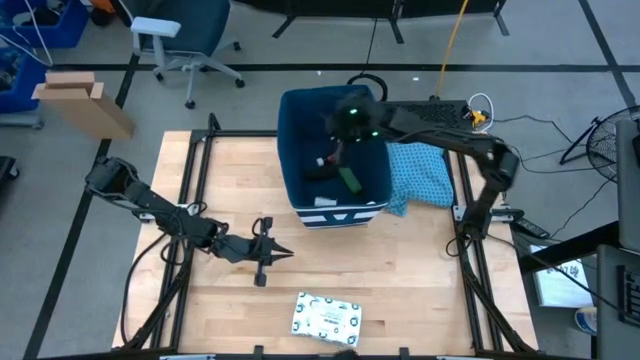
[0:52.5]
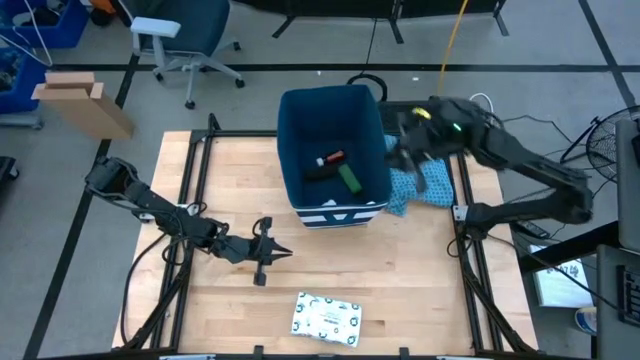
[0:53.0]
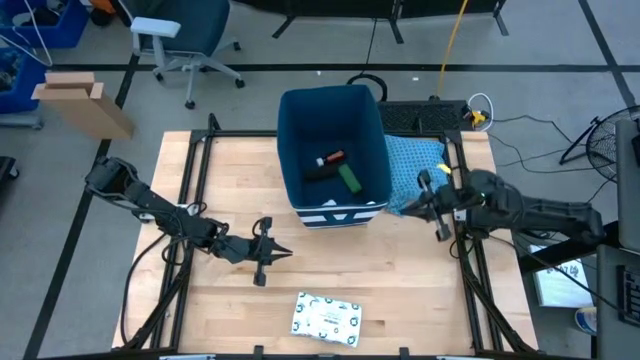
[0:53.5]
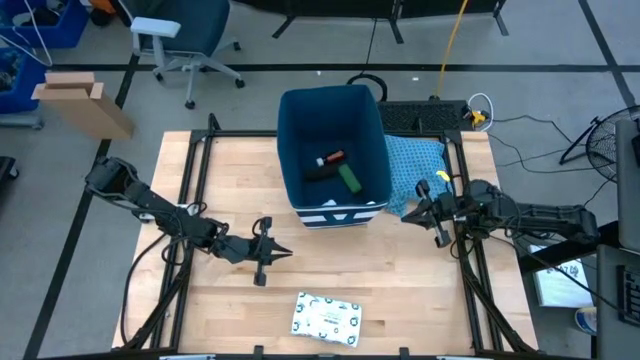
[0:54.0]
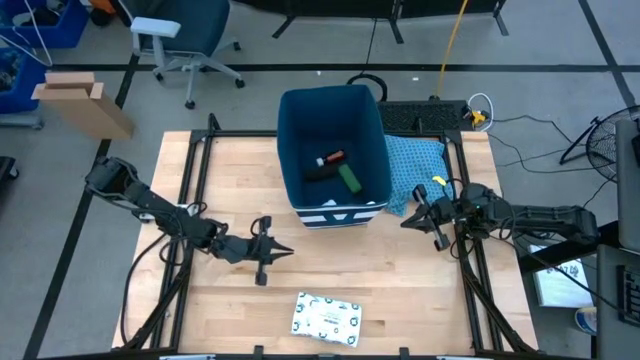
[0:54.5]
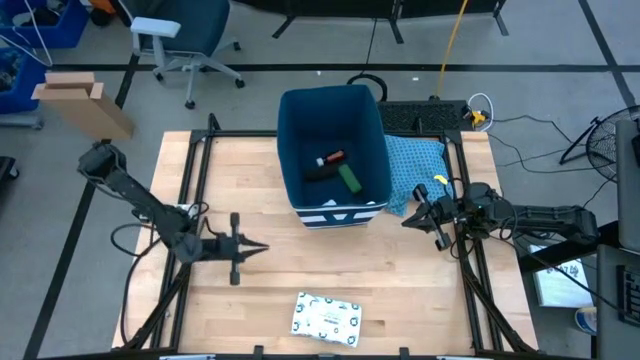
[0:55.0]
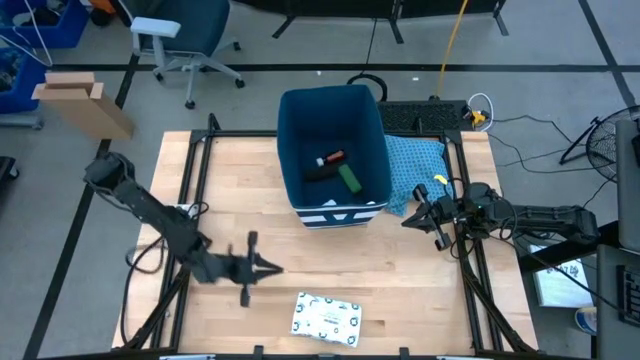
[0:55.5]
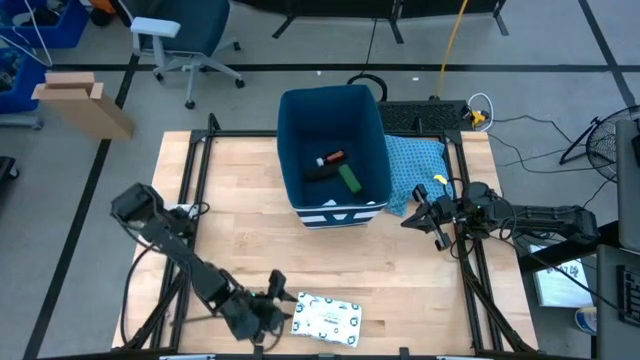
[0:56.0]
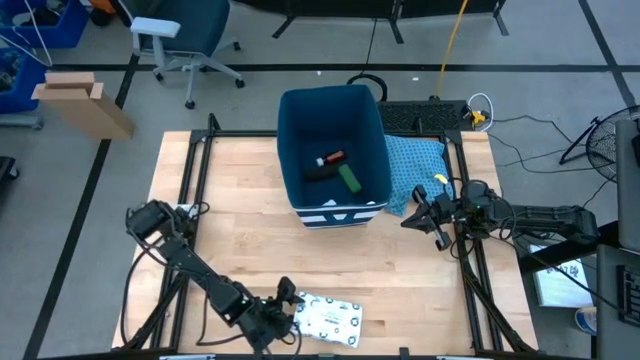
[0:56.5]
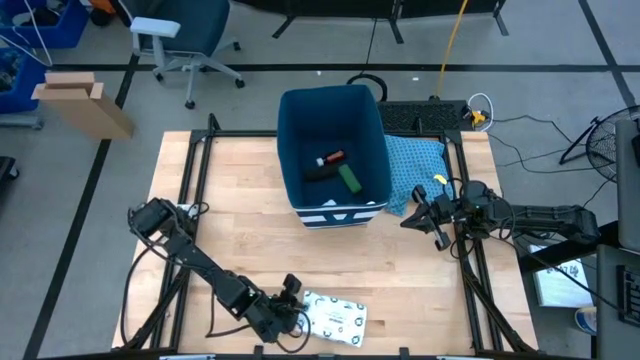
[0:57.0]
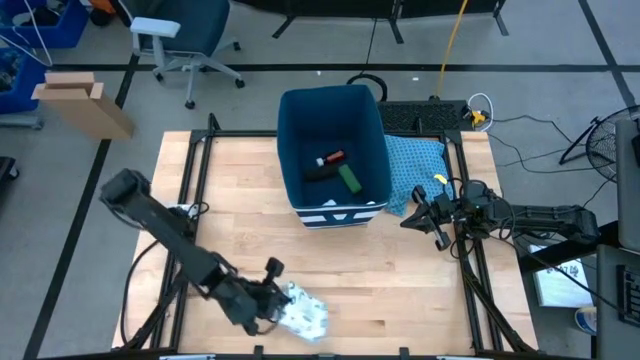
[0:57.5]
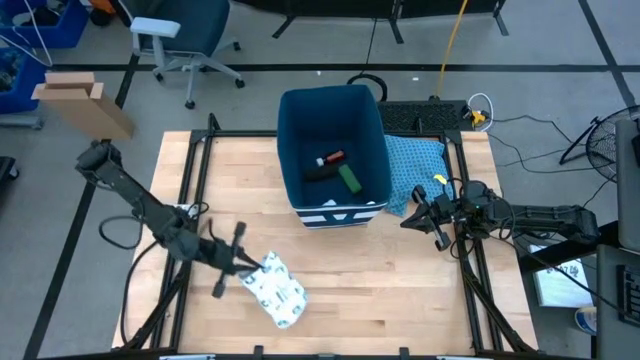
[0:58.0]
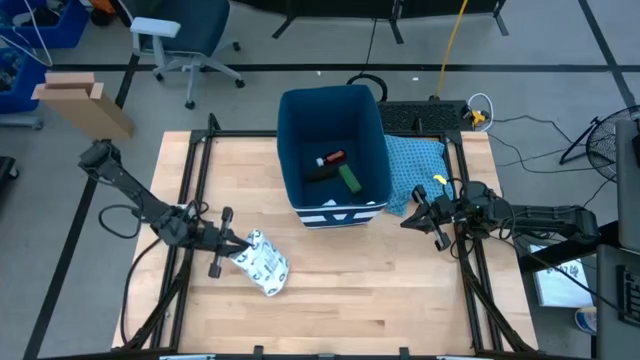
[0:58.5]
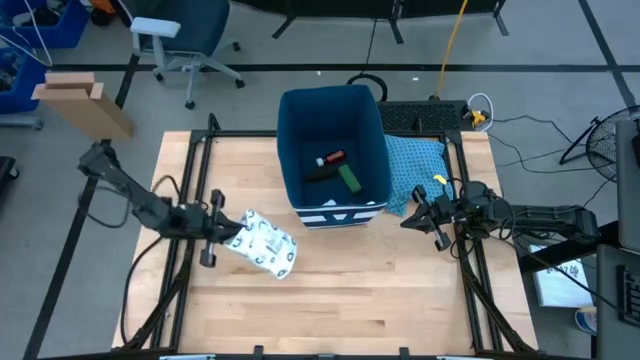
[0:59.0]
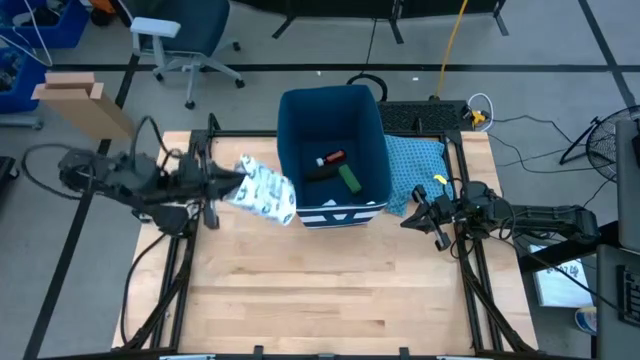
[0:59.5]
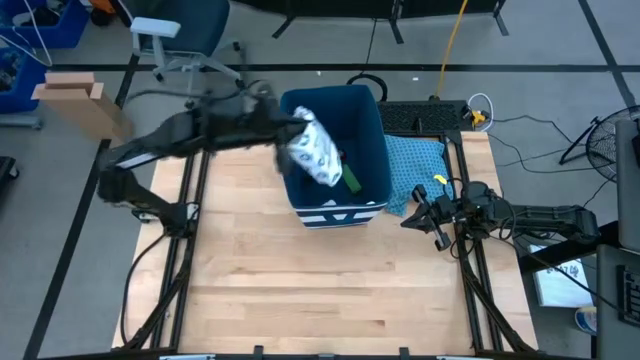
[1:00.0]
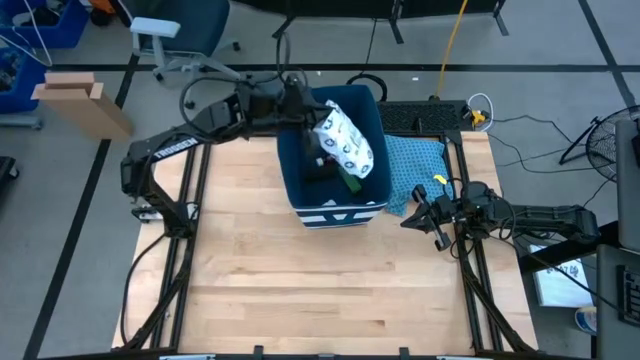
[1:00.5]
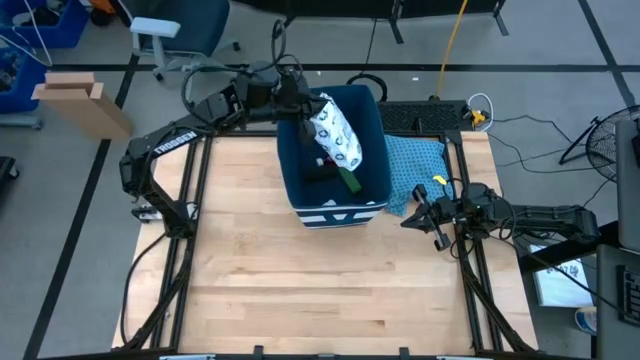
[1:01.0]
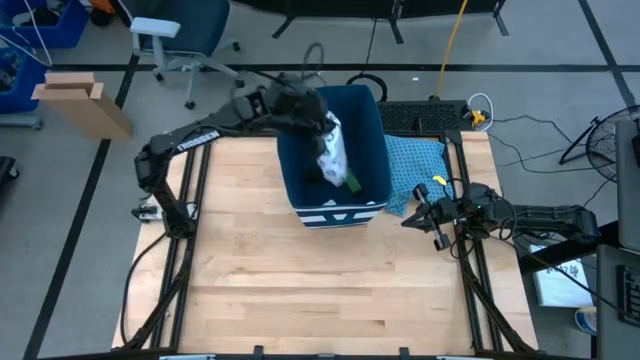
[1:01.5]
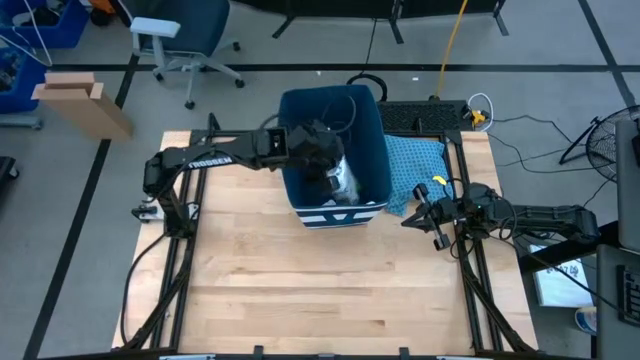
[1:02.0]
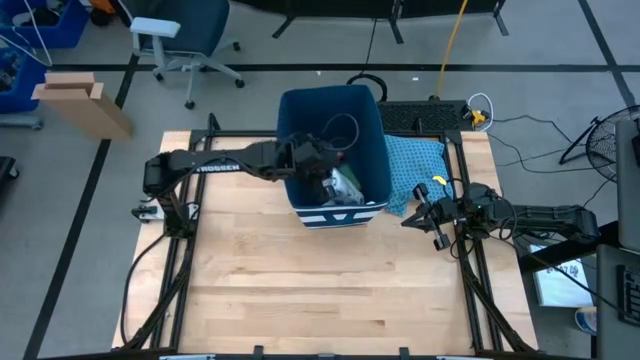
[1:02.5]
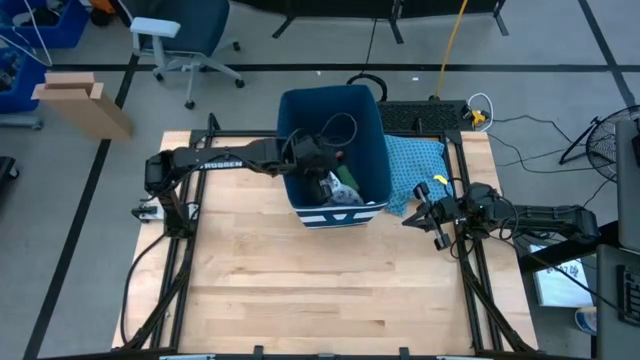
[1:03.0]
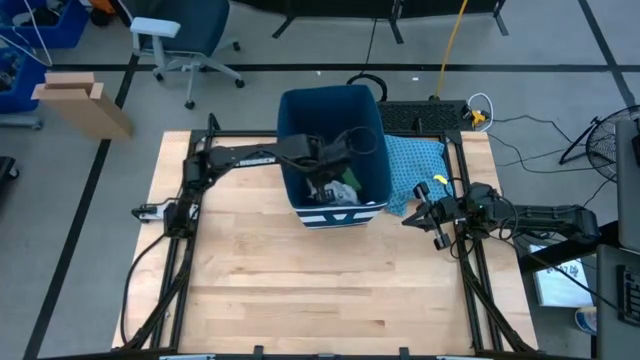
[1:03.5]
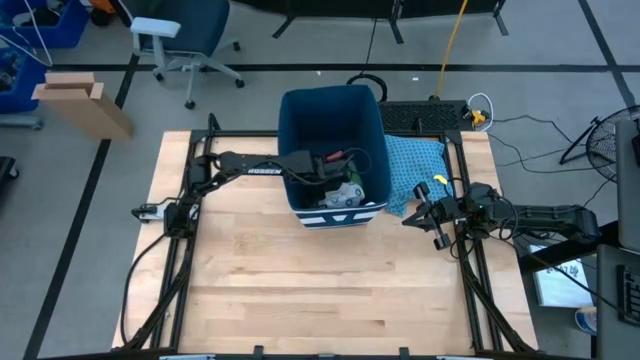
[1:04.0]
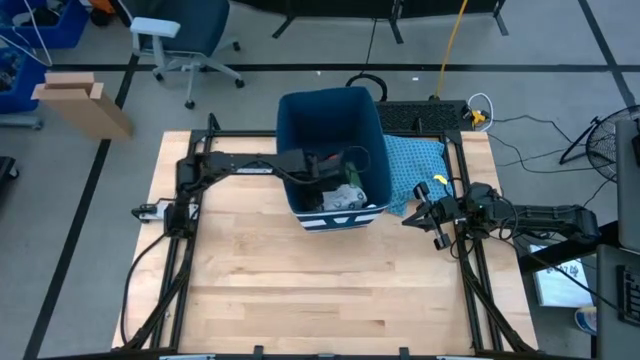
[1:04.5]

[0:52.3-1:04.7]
Task: Pick & place medical supplies in basket/bin
Put the mailer bag into the blue bin

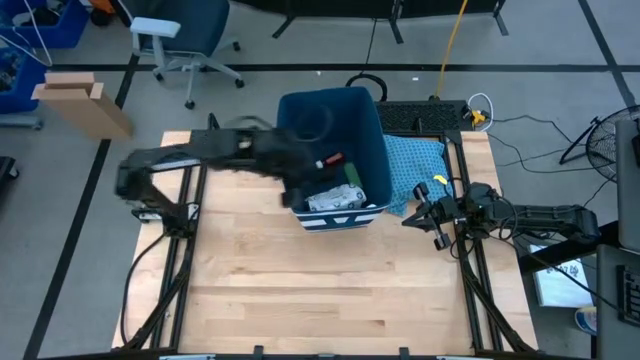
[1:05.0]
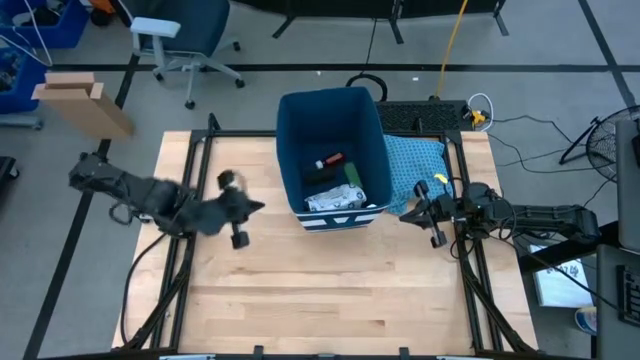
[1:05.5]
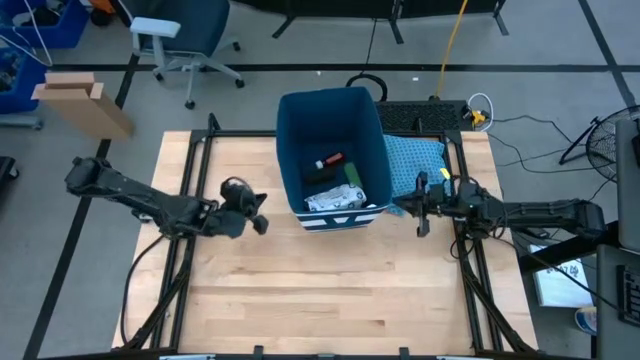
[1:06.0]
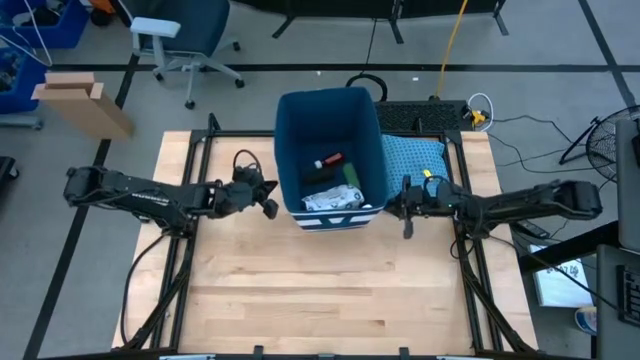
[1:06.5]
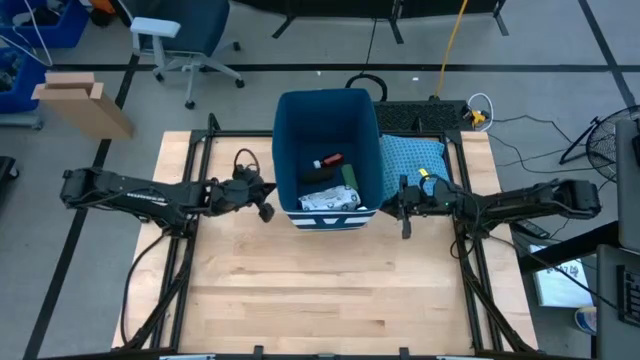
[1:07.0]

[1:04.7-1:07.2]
Adjust the blue bin

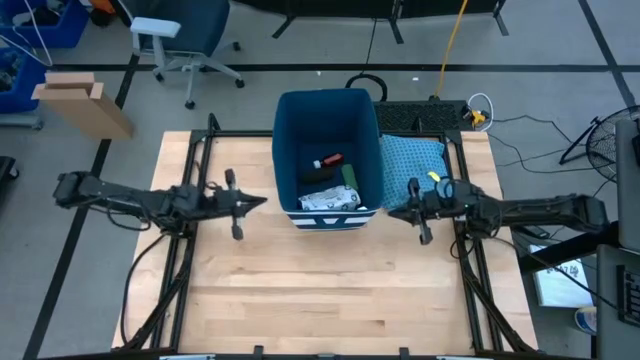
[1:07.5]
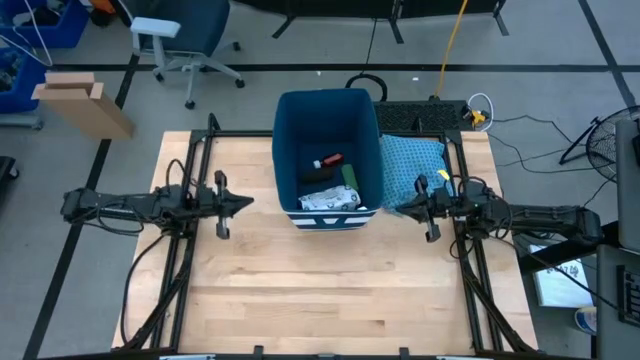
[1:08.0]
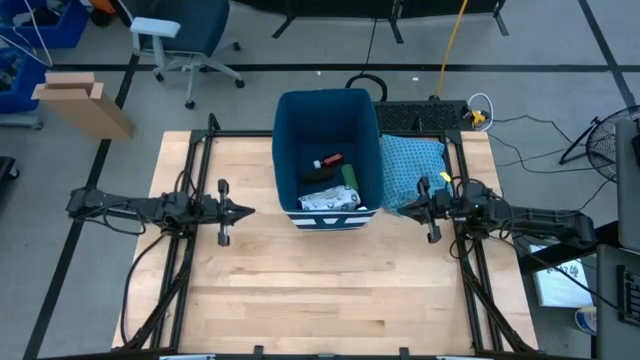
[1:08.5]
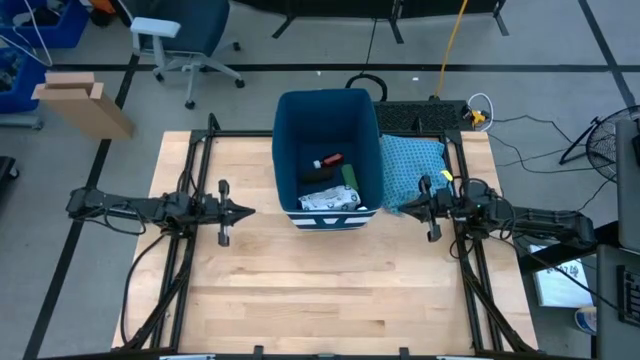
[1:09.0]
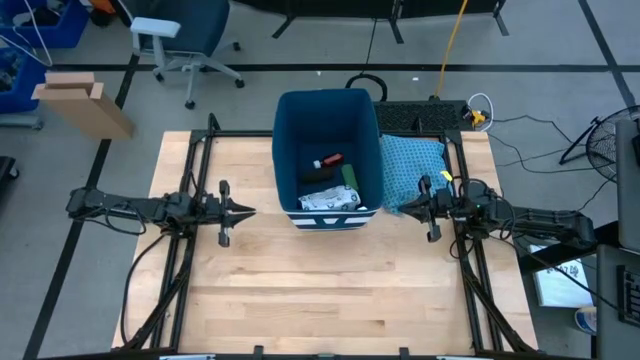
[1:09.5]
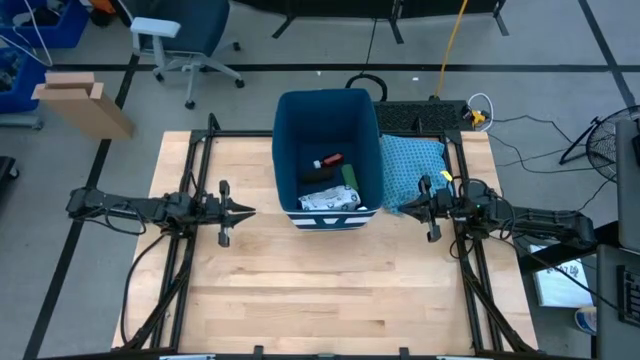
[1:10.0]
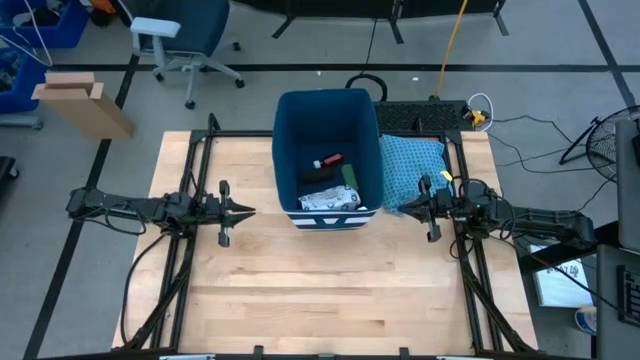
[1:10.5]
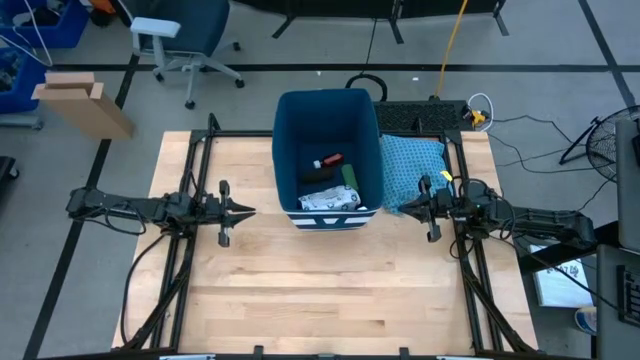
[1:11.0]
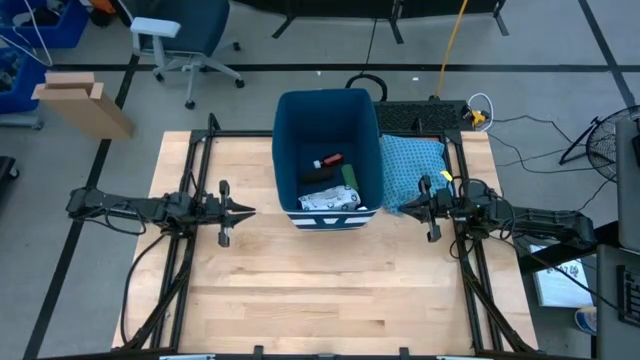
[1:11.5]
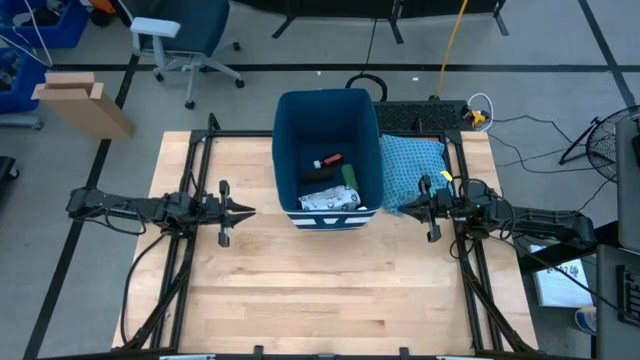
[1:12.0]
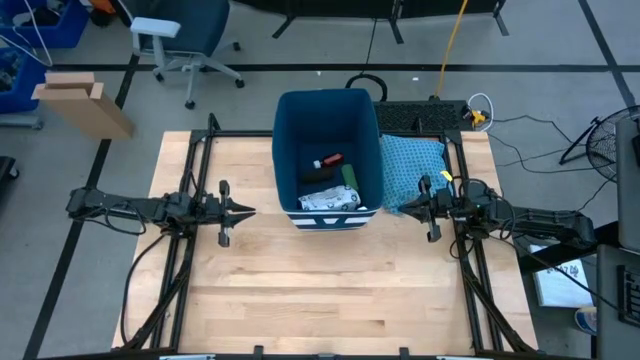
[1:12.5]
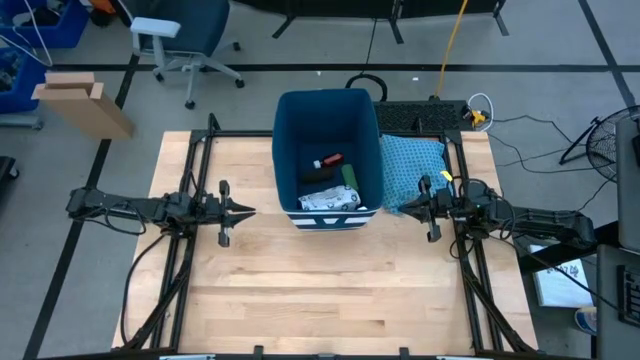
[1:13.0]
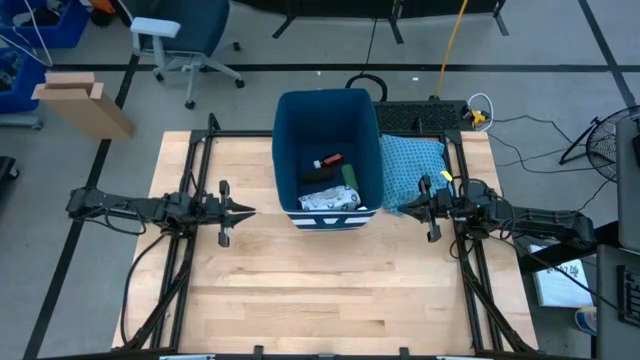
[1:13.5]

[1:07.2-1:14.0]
Return to Home Position

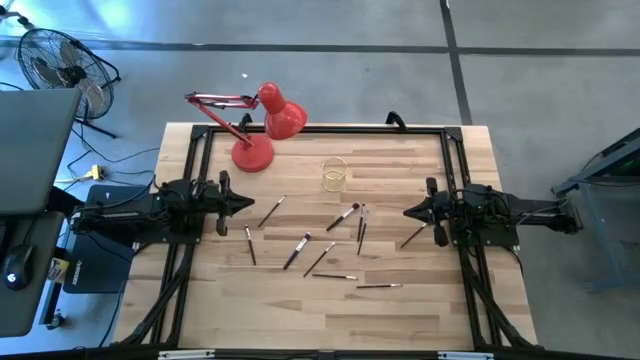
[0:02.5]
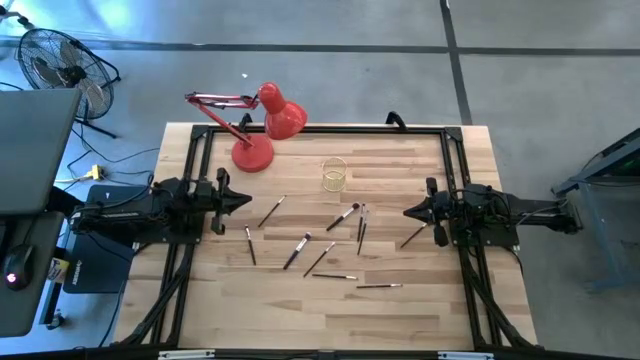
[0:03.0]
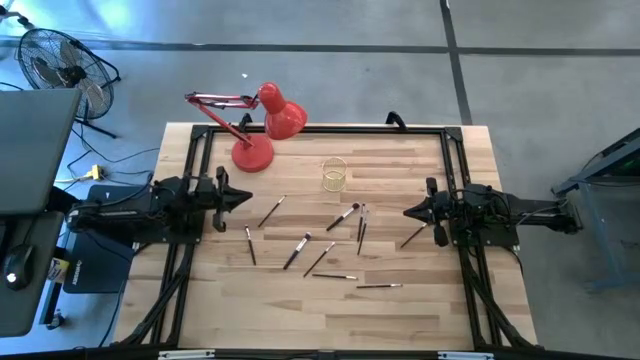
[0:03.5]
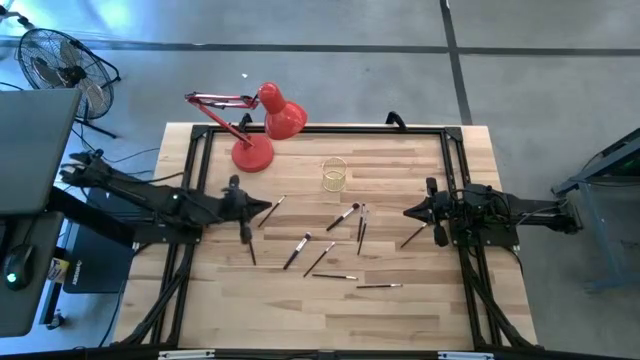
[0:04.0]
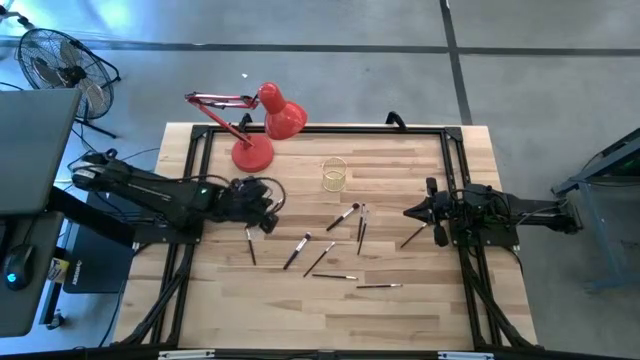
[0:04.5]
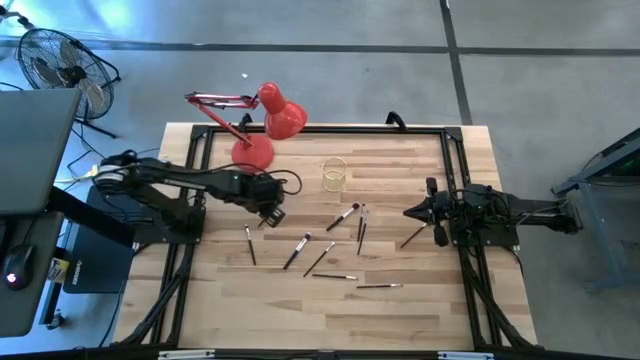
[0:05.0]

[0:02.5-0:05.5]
Task: Put items in baskets/containers
Put the brush into the wire bin
